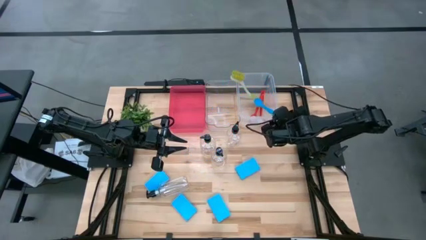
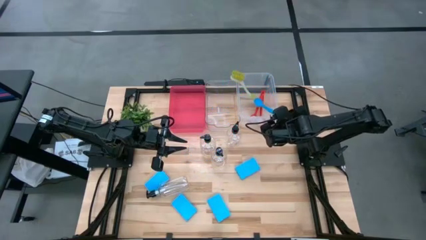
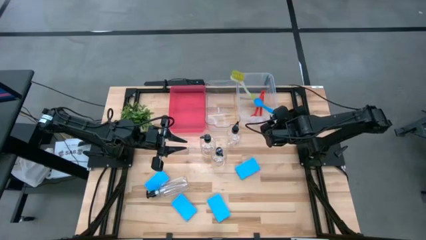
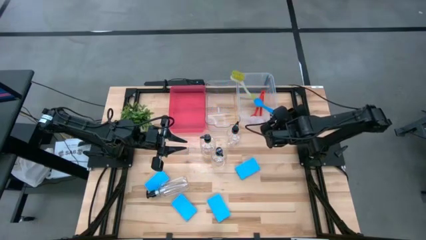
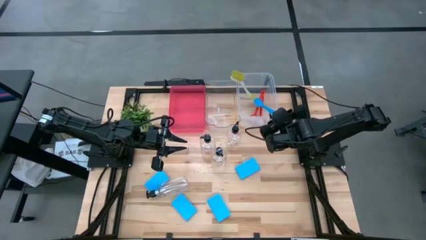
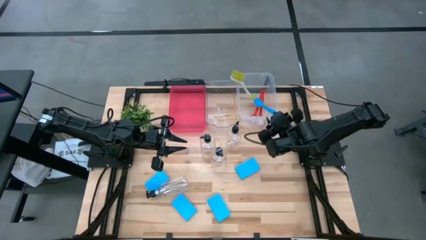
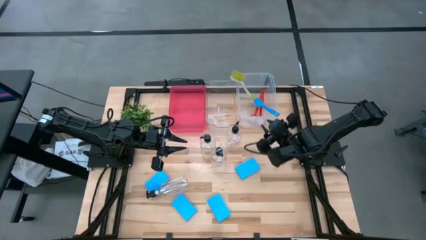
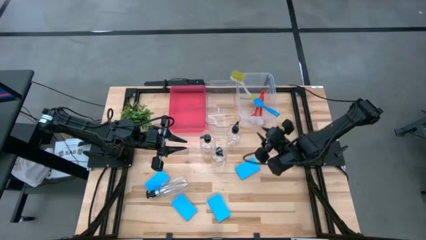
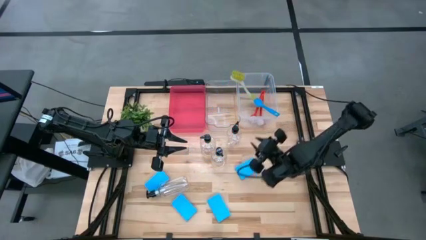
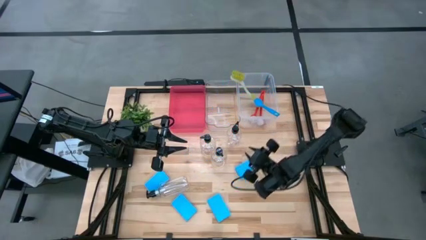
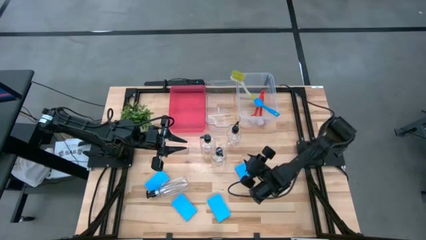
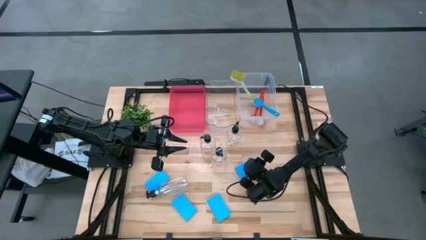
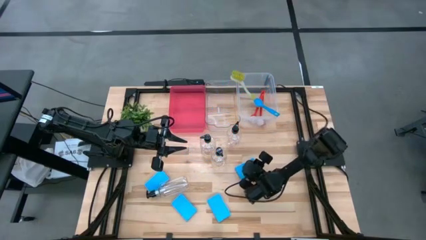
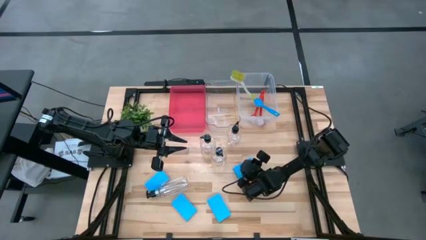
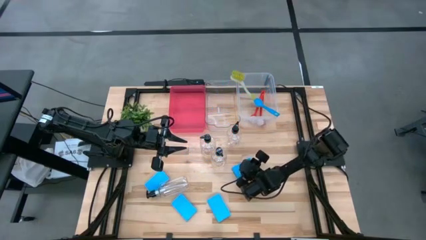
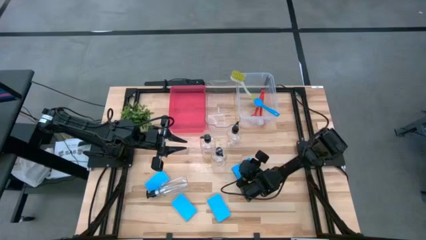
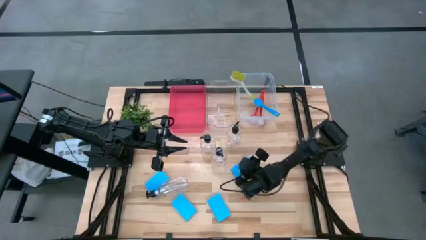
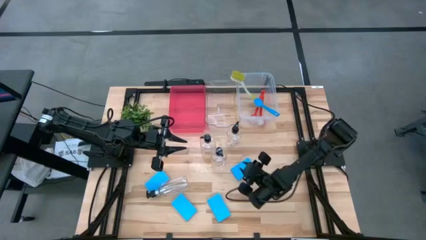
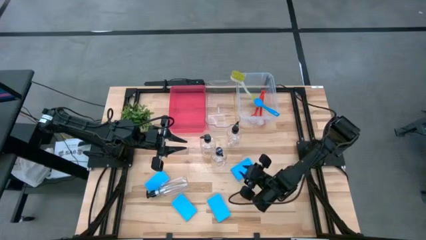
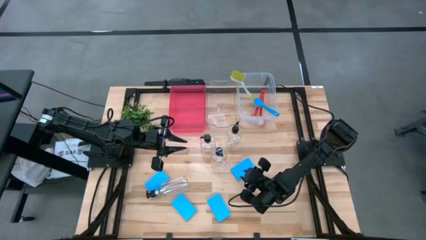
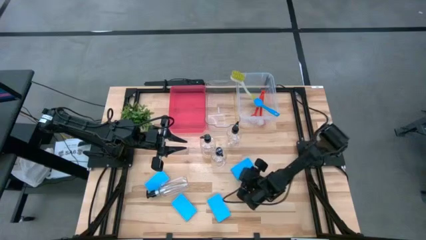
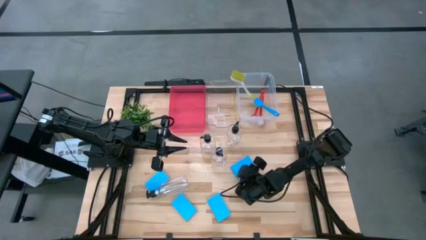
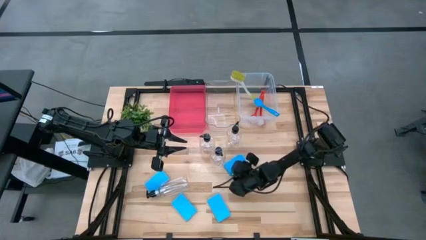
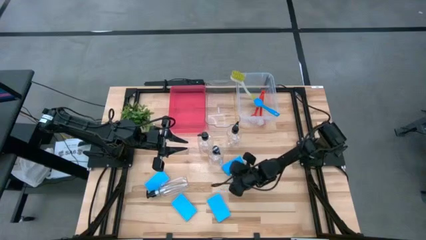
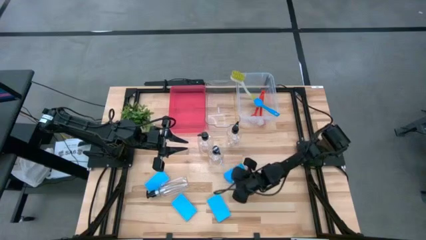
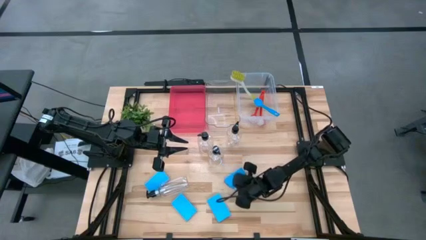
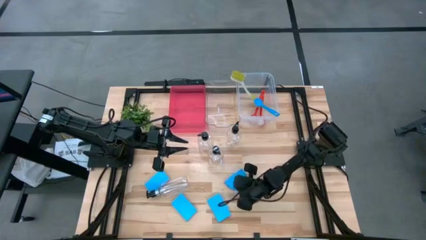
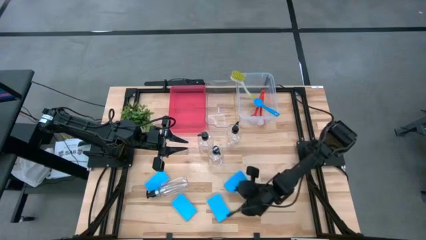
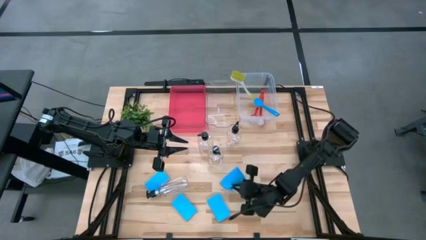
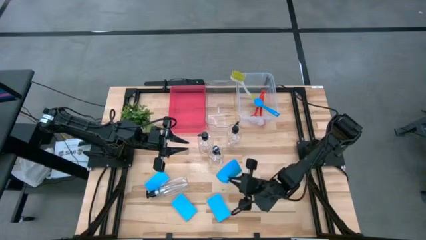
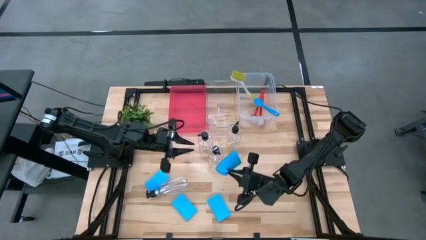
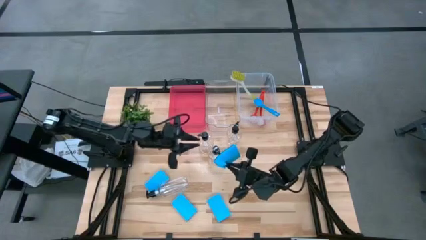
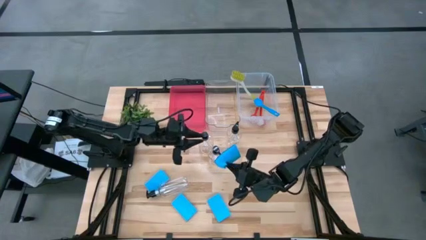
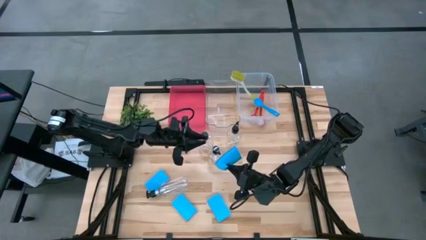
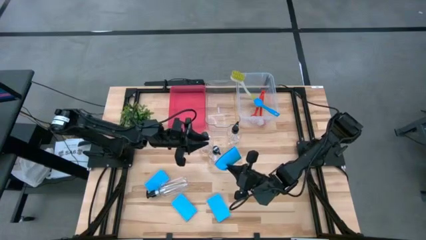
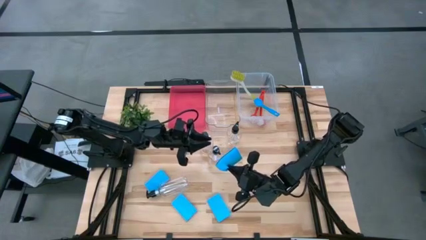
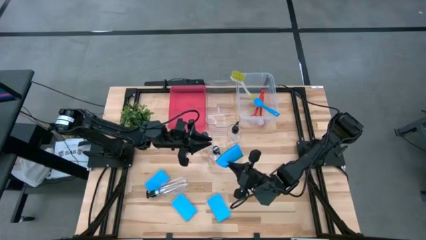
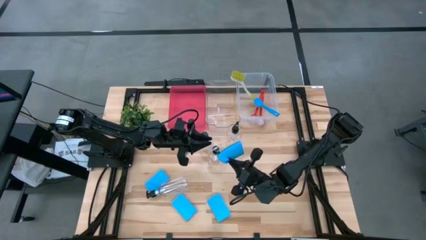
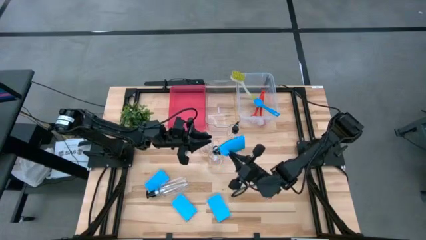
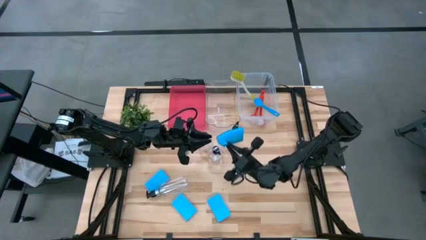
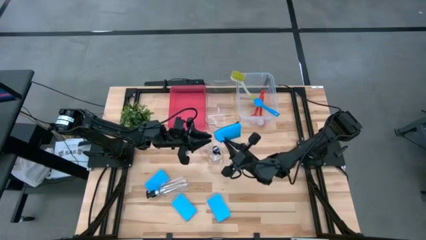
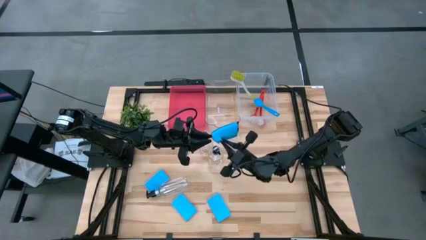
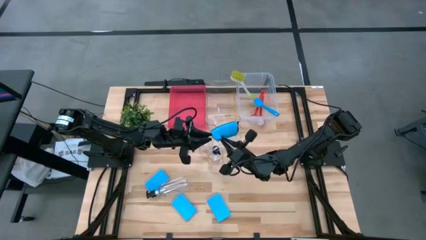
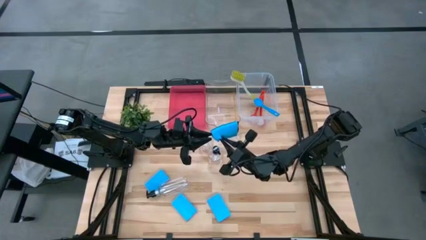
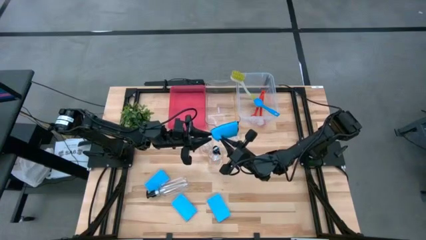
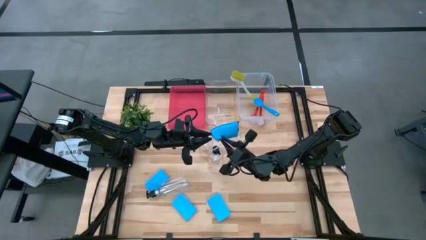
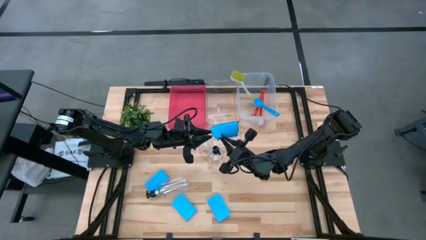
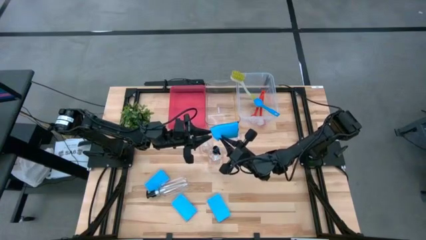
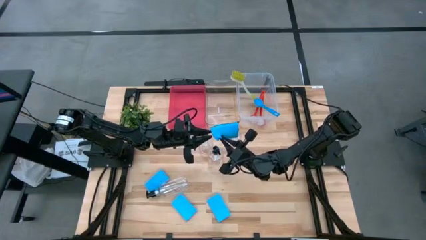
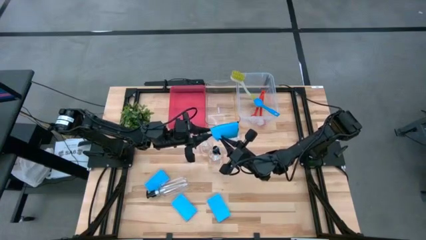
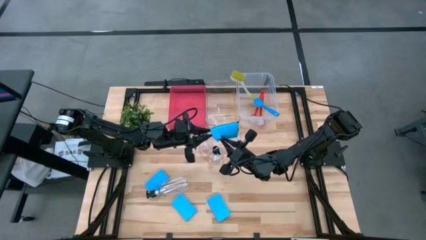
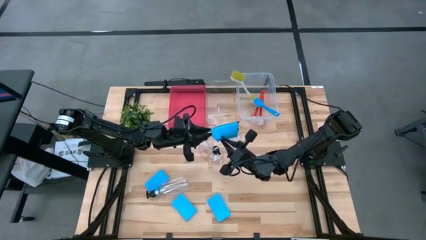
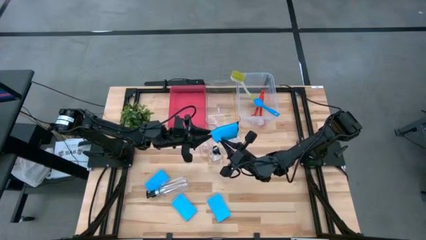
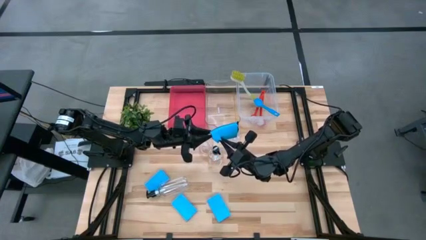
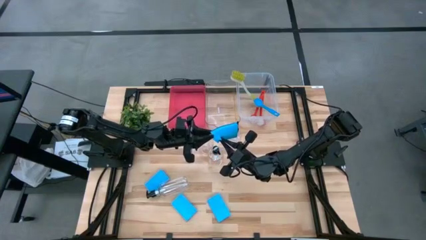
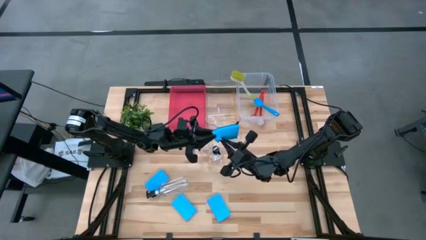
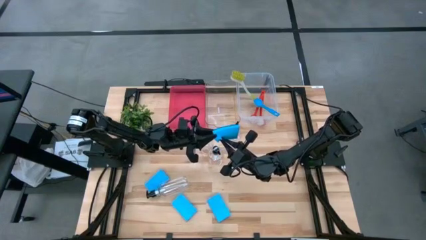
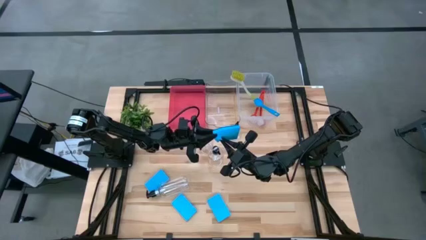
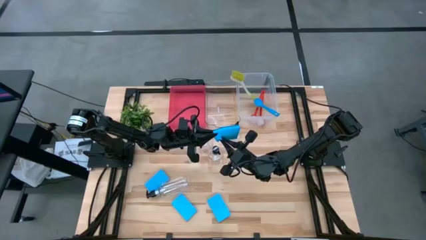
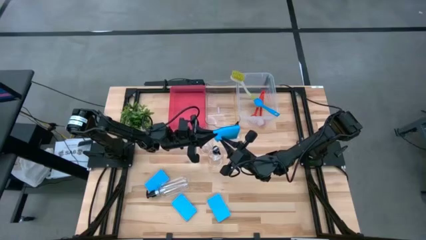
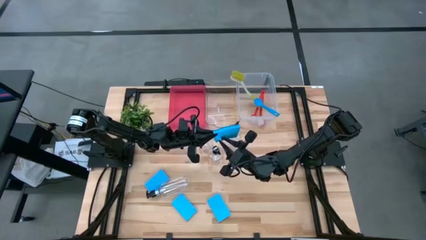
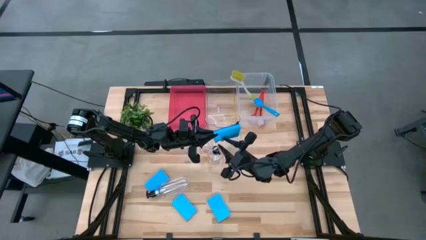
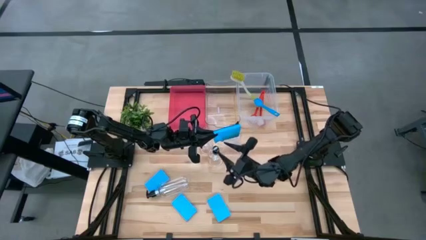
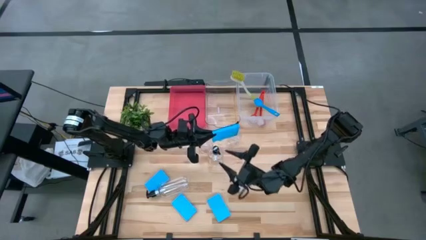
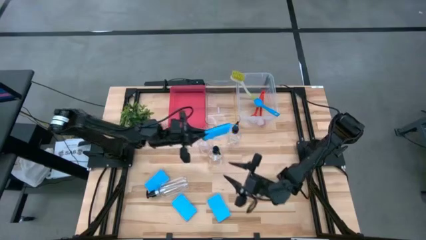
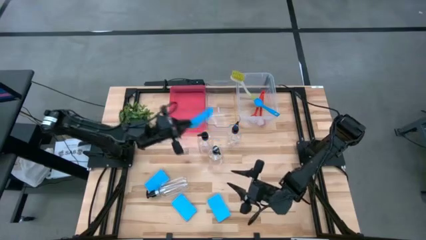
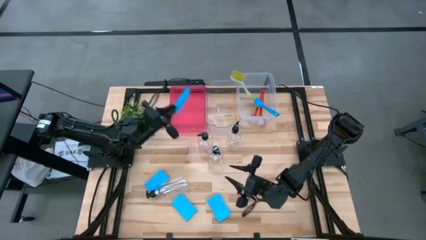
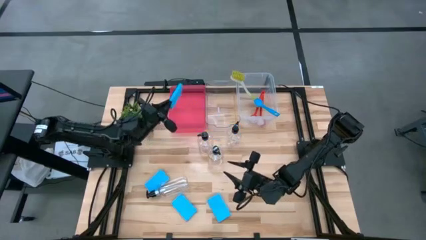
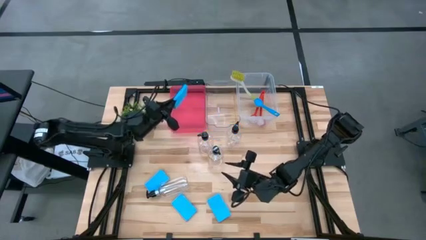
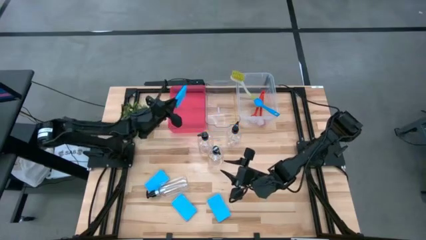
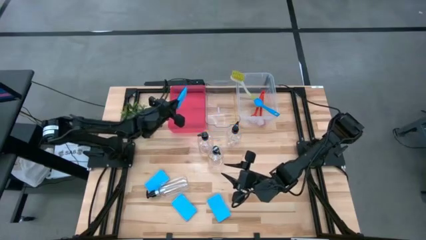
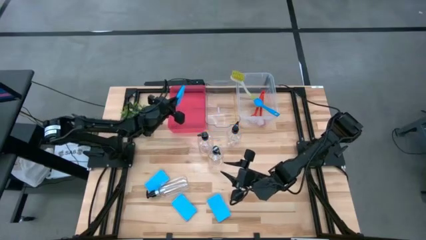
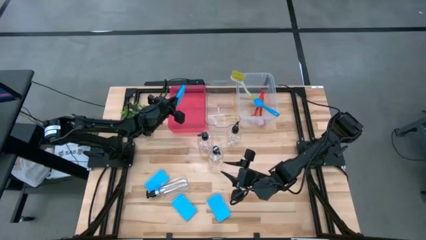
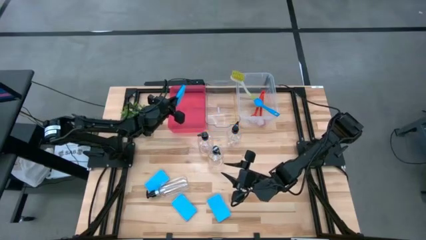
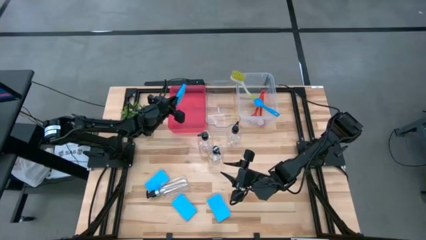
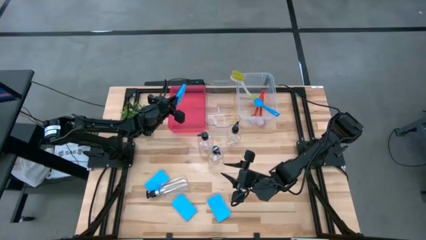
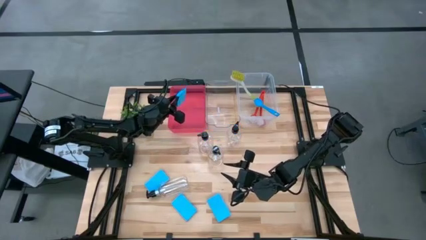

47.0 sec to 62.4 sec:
Task: Pick & Place Kitchen Sink Supplies
Put the blue sponge into the red bin

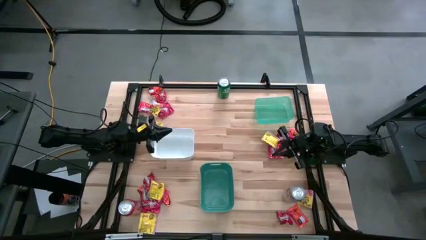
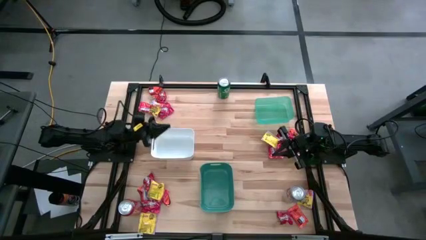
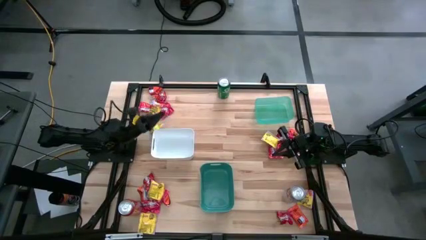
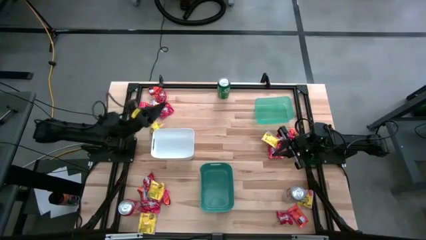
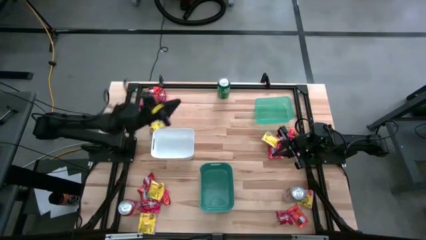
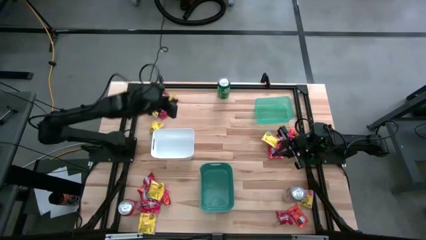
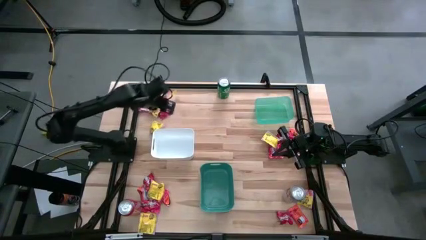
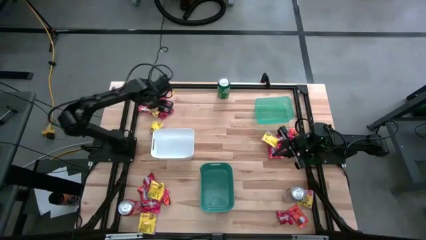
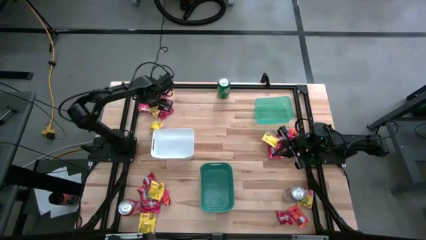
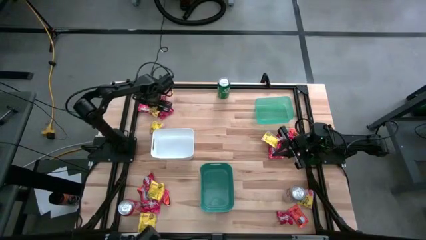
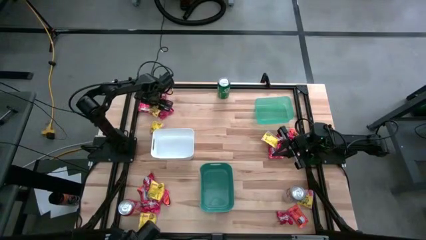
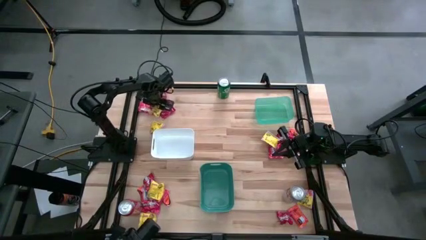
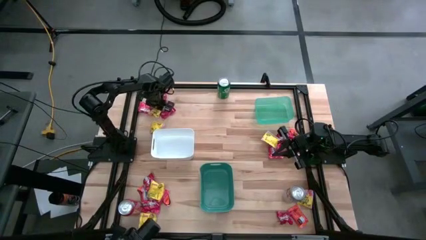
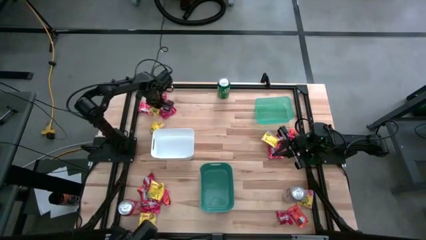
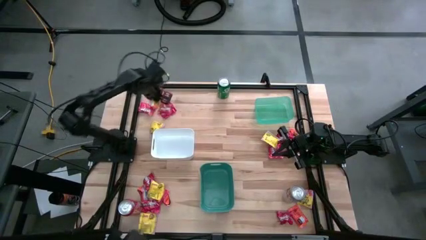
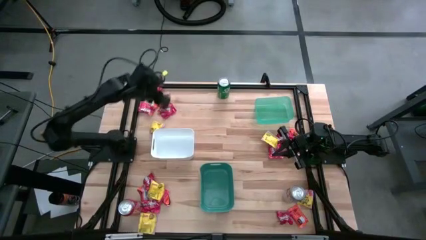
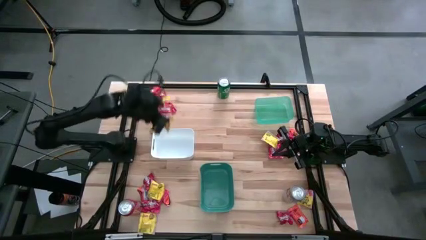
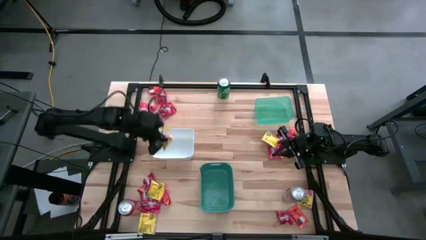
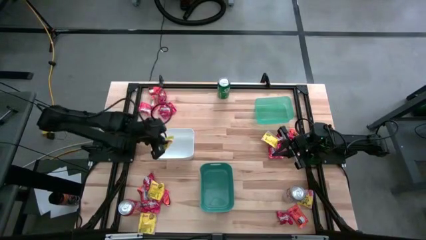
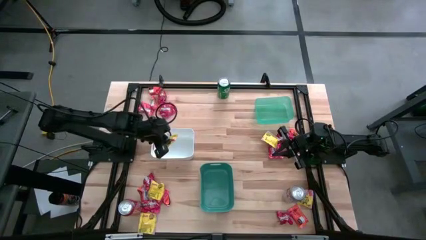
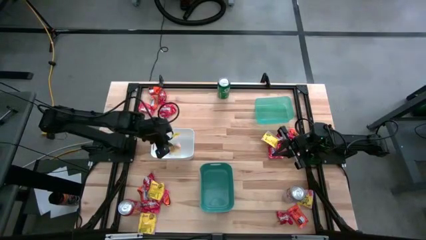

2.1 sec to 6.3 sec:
Task: Sort candy
Put the yellow candy pack into the white bin
